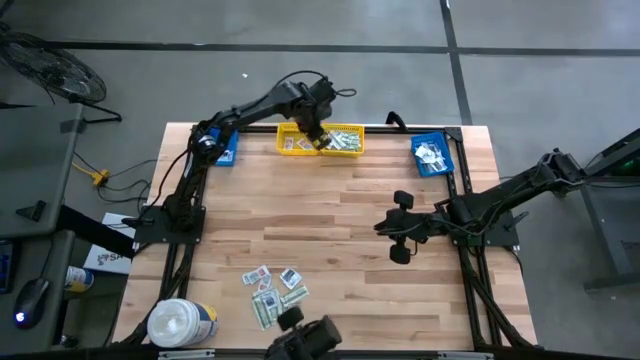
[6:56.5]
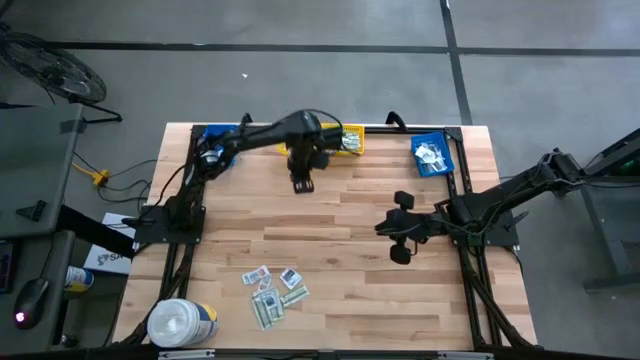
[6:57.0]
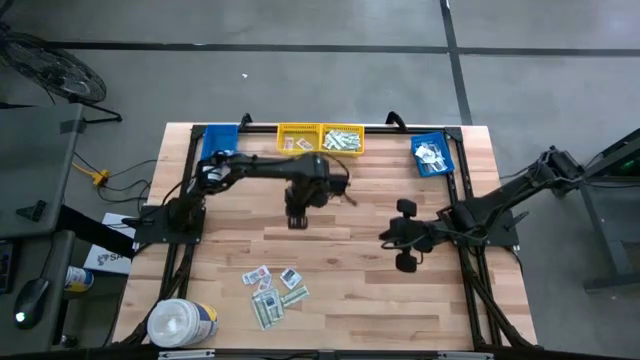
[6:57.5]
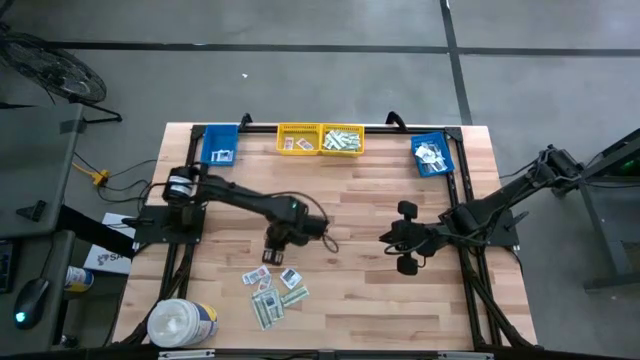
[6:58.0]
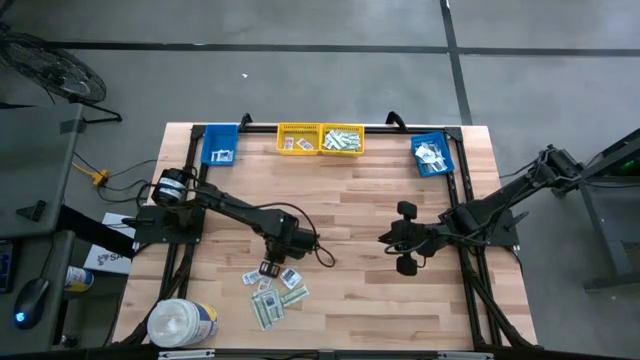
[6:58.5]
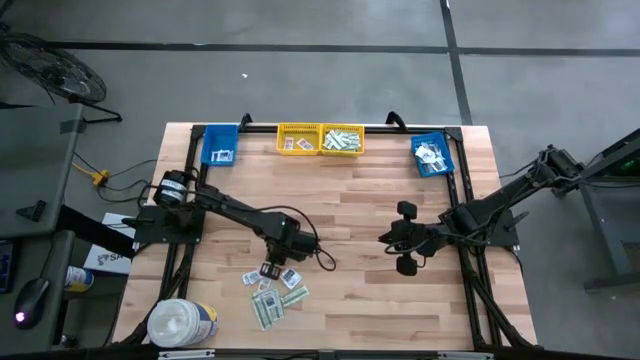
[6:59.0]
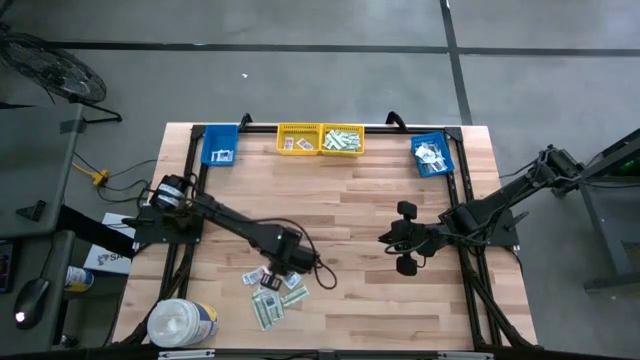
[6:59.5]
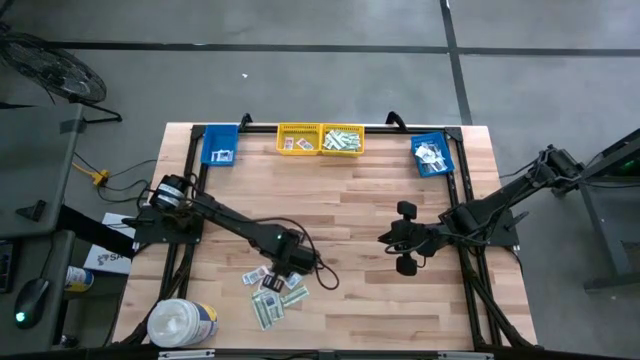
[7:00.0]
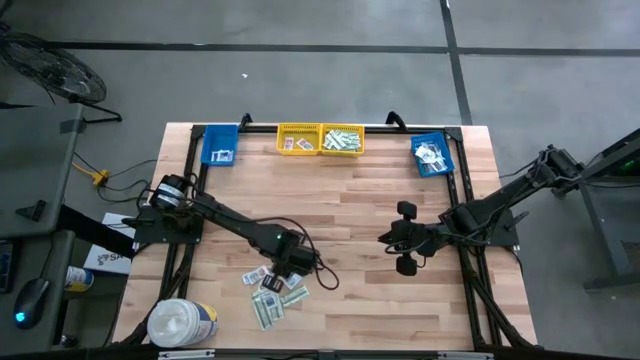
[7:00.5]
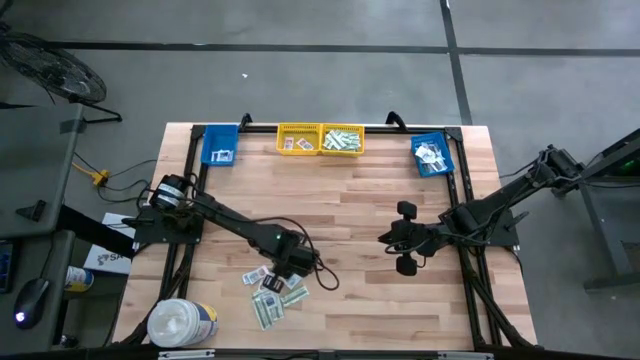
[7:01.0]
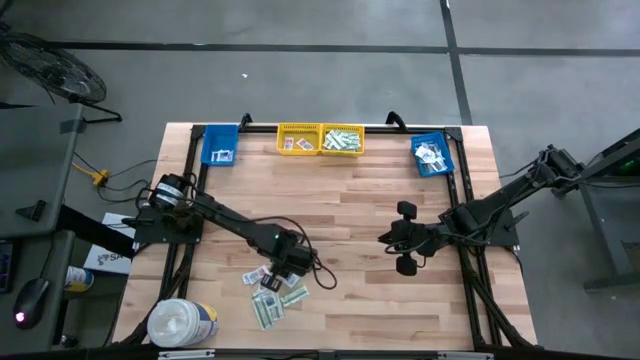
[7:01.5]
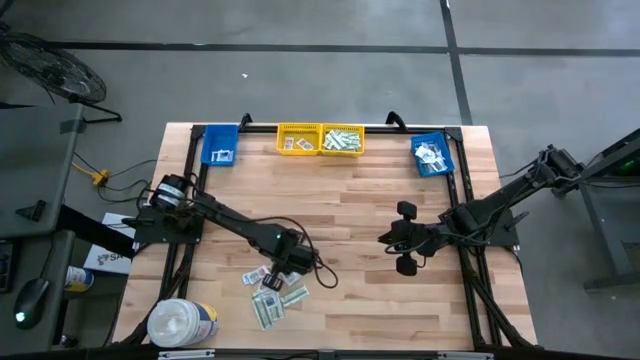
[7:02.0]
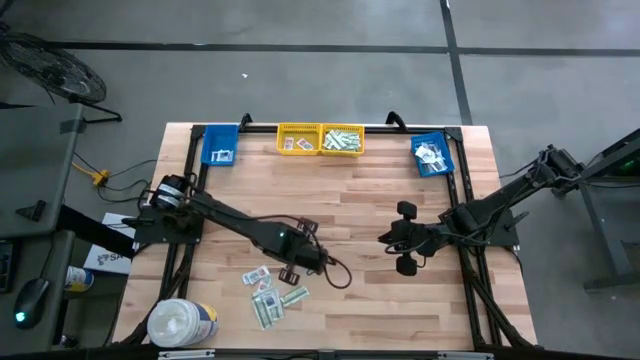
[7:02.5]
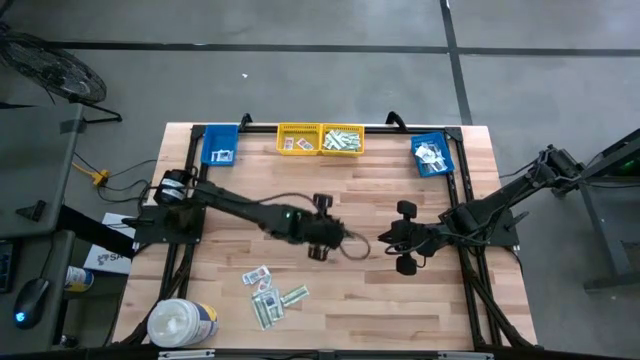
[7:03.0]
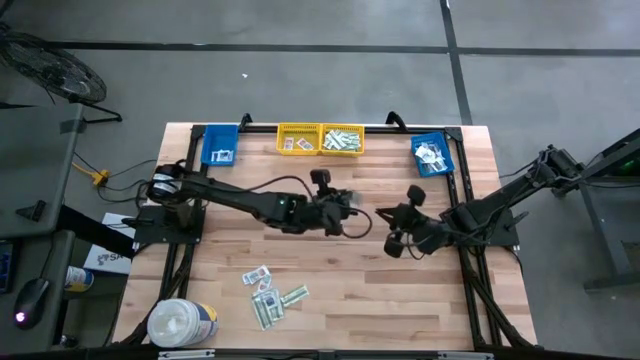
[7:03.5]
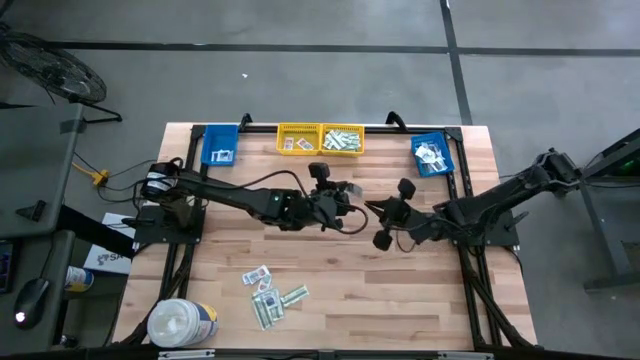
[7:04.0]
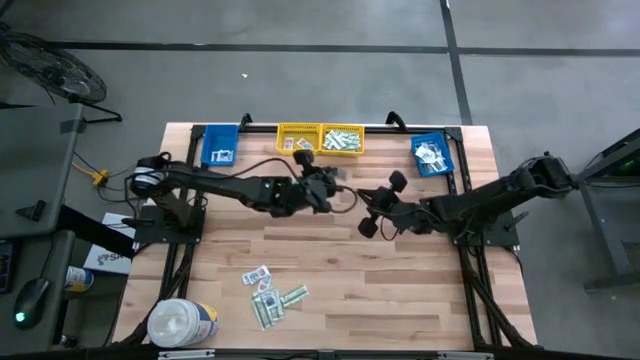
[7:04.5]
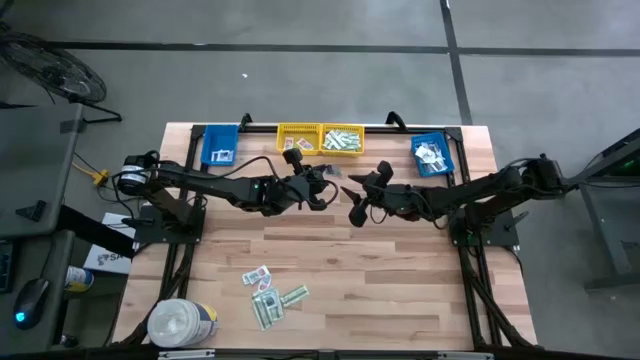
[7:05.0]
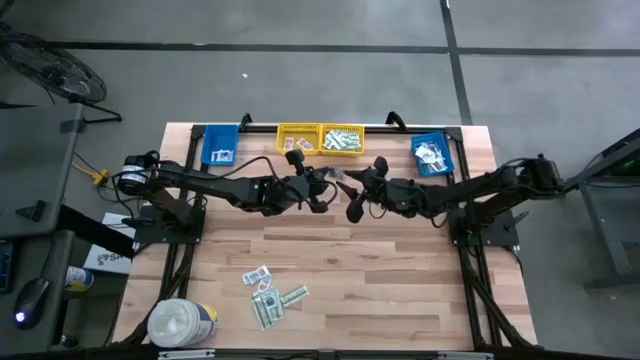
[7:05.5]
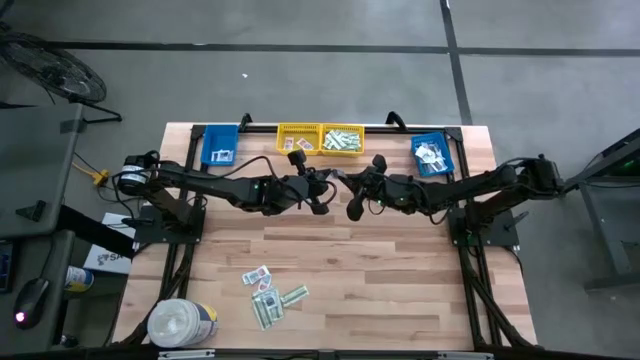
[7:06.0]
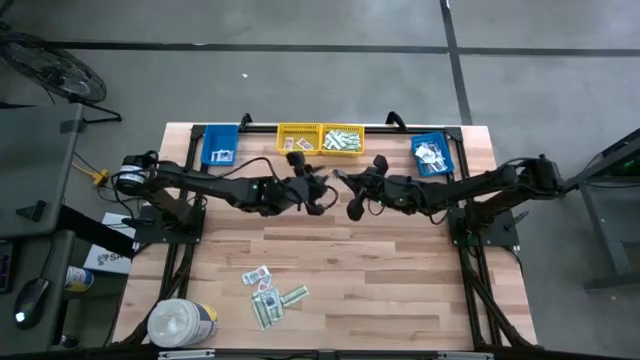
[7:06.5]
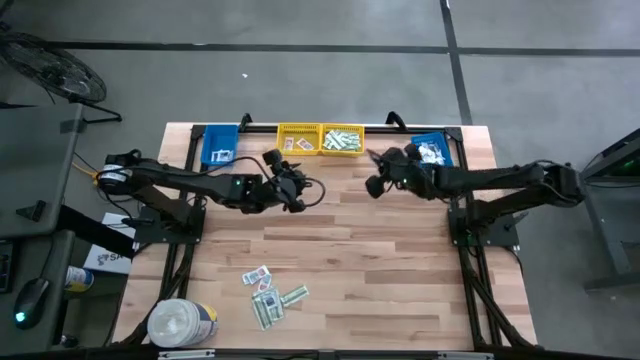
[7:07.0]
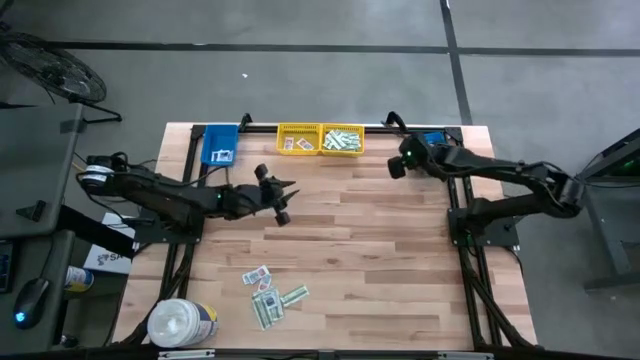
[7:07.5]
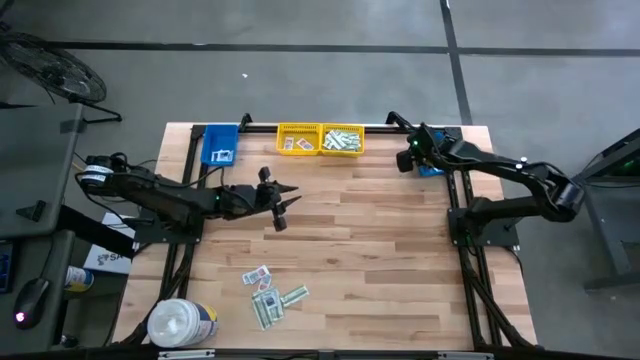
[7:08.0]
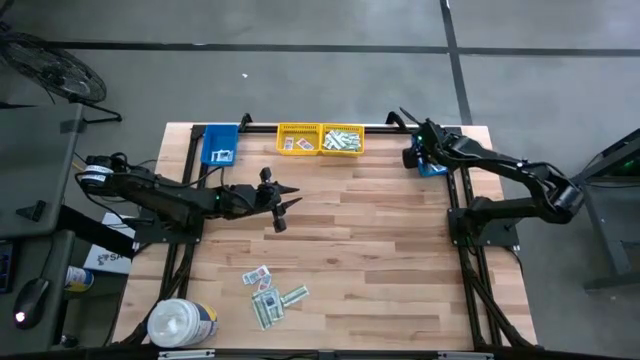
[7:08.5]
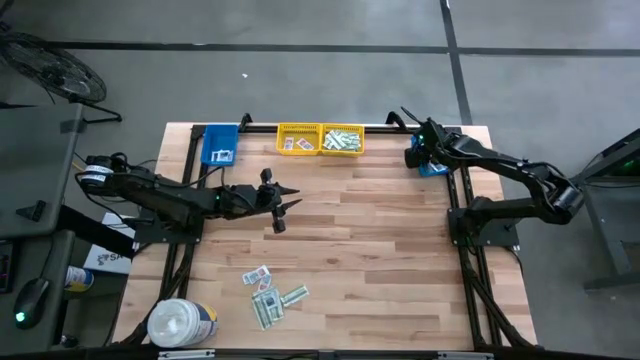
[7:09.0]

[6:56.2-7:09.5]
Task: Pick & Place First Aid Supplies
Put the black towelette pack into the right blue bin

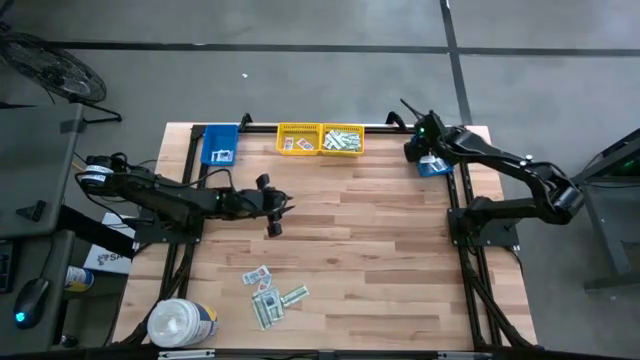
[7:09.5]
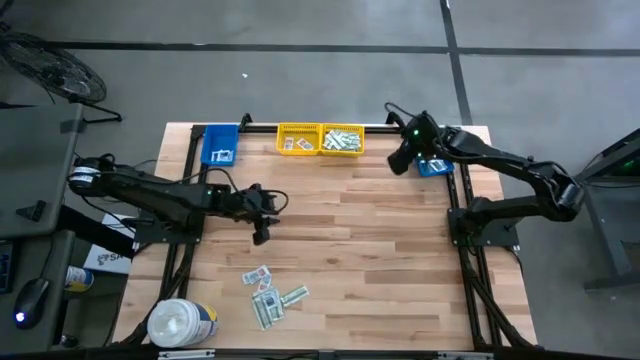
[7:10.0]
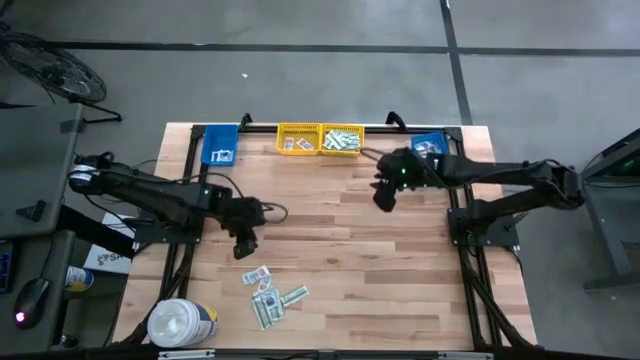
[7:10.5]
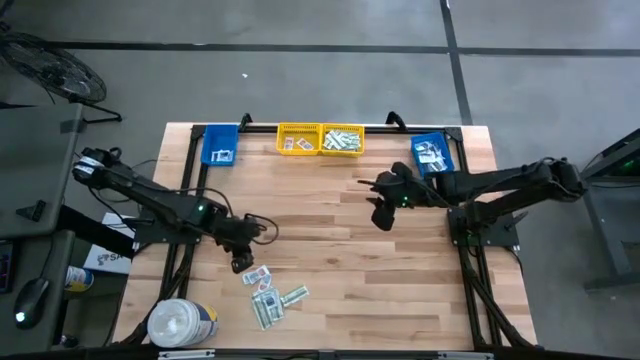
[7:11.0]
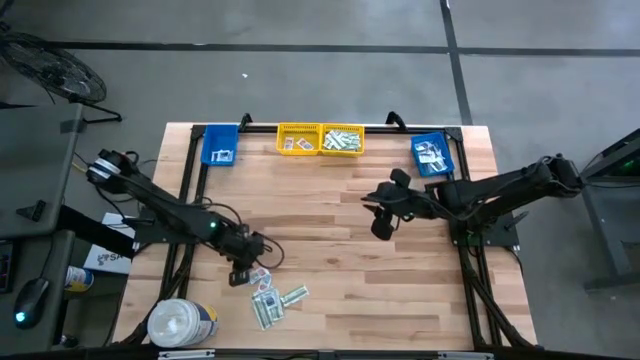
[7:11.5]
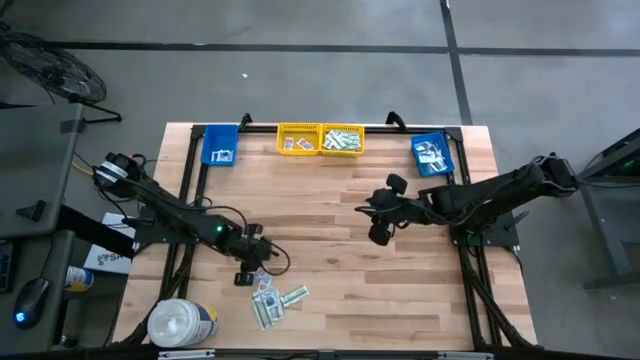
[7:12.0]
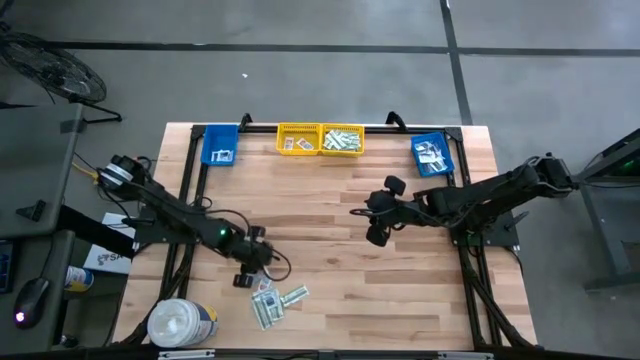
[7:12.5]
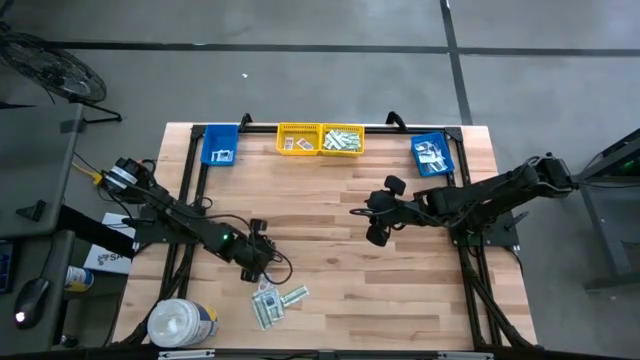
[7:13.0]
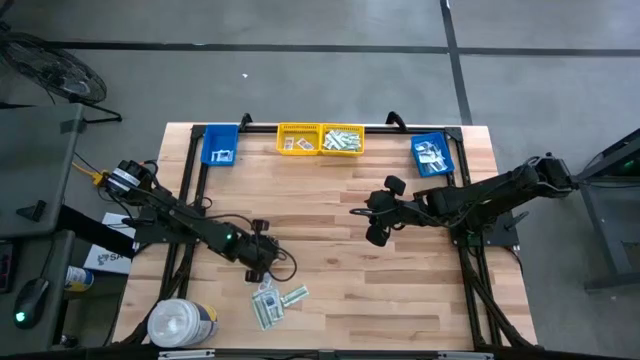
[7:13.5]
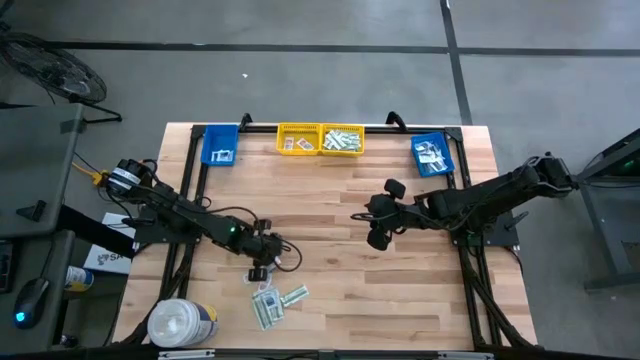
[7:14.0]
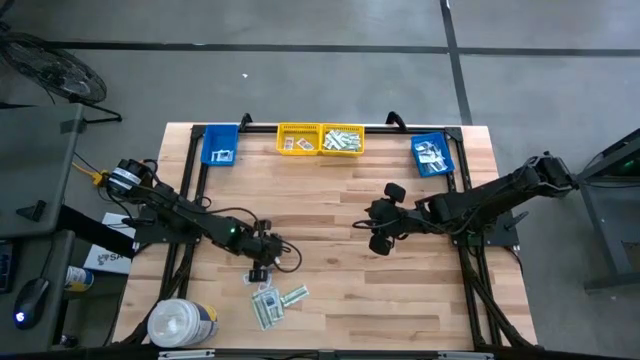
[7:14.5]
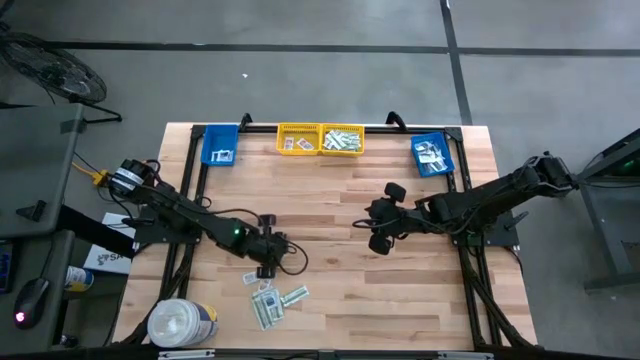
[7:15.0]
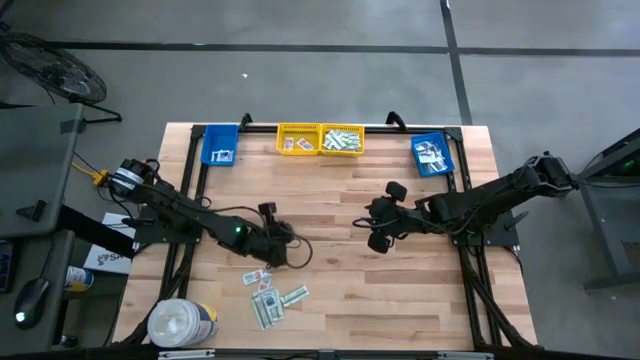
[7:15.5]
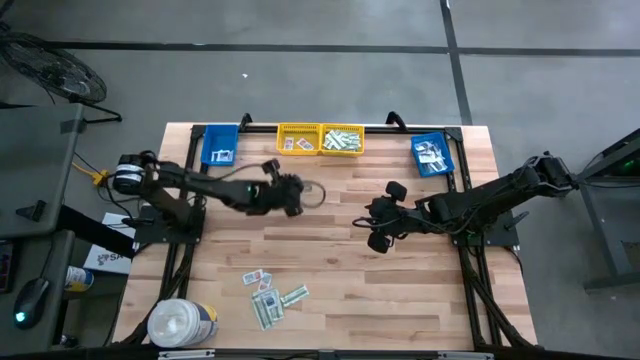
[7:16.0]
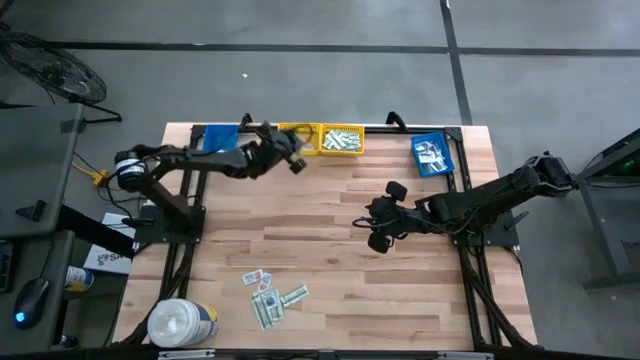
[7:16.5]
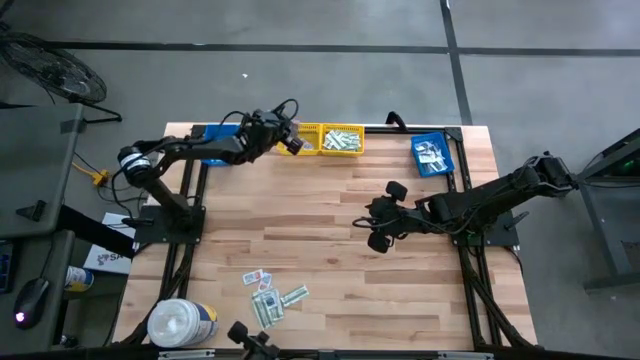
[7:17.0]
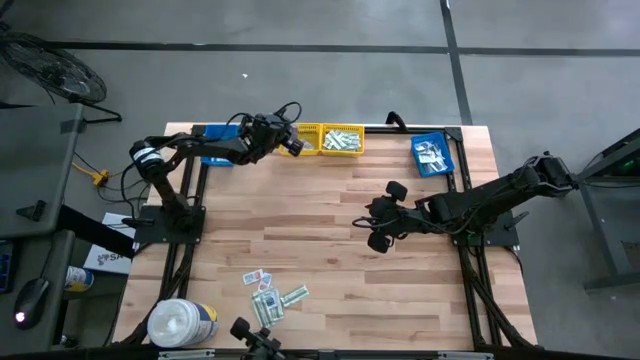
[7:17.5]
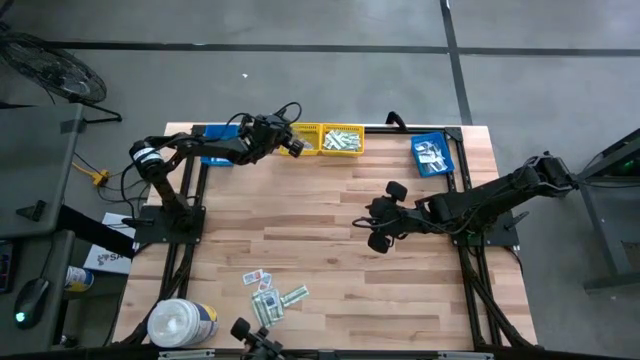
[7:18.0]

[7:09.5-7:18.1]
Put the orange ointment pack into the left yellow bin
